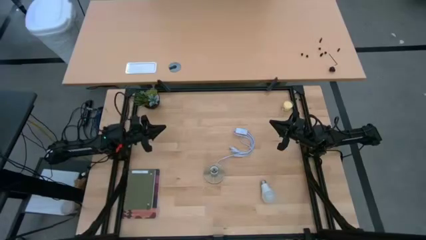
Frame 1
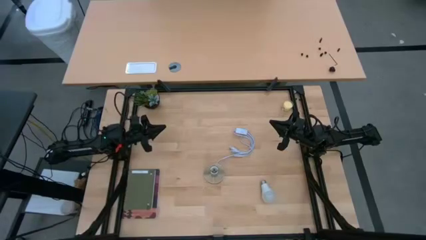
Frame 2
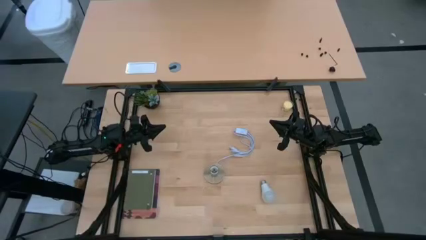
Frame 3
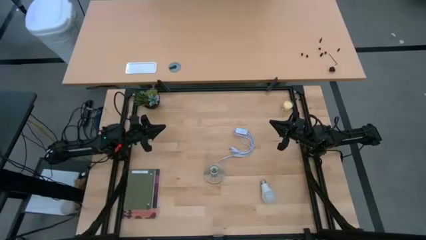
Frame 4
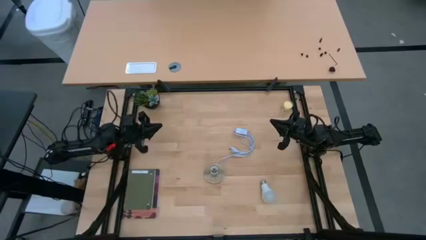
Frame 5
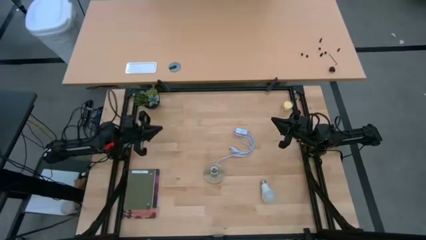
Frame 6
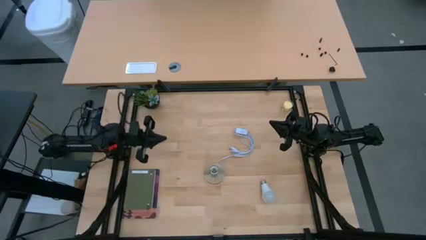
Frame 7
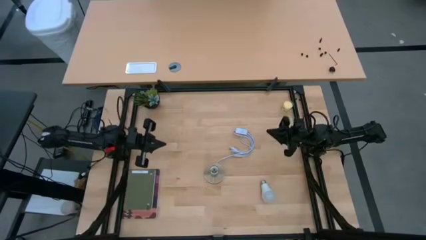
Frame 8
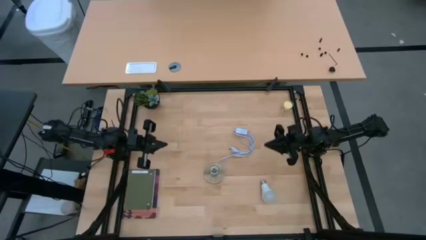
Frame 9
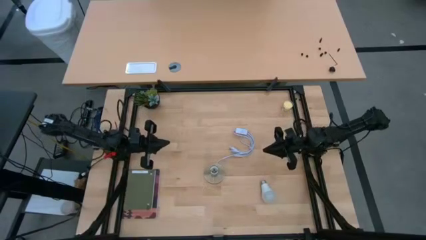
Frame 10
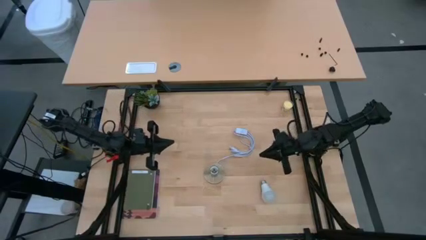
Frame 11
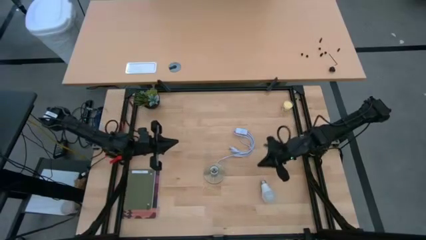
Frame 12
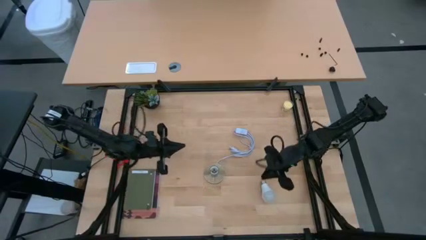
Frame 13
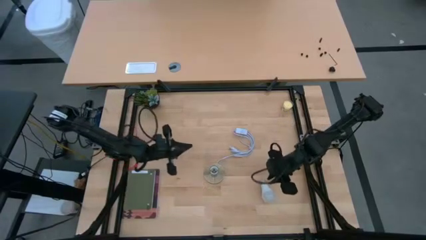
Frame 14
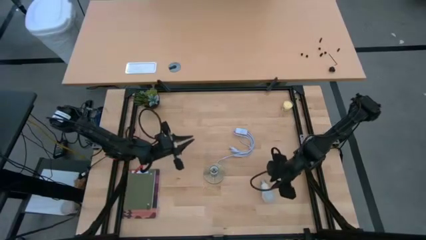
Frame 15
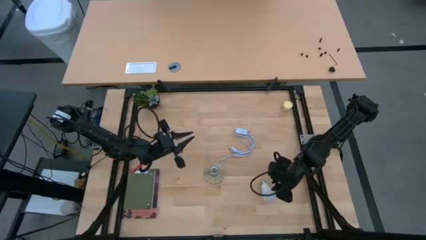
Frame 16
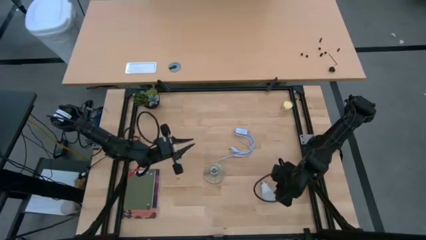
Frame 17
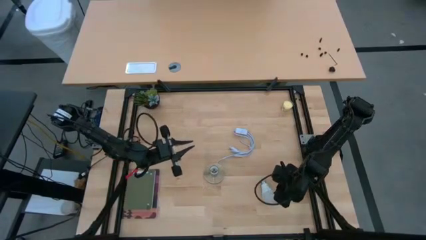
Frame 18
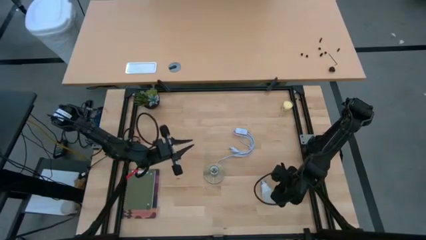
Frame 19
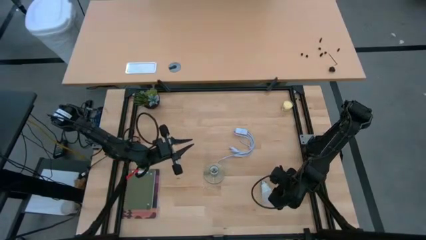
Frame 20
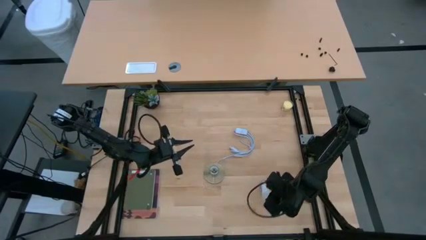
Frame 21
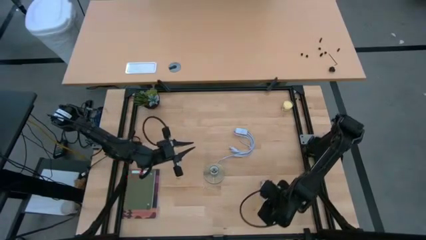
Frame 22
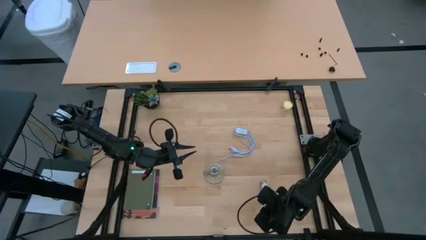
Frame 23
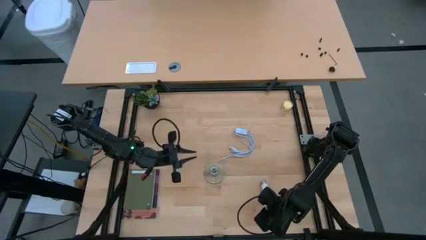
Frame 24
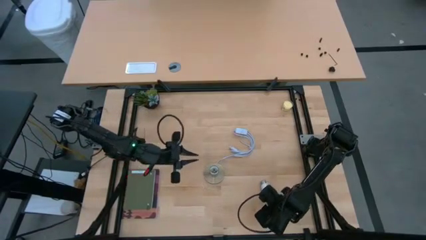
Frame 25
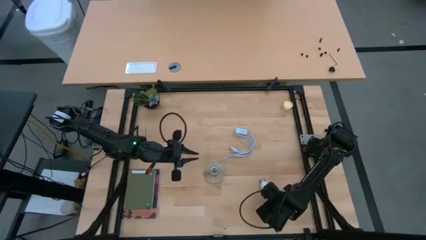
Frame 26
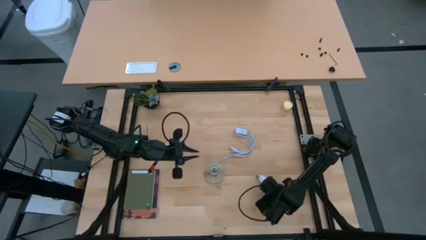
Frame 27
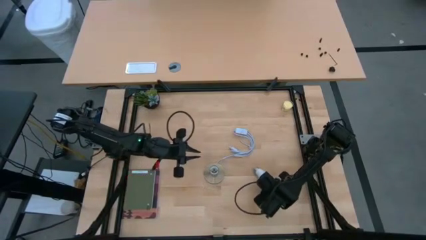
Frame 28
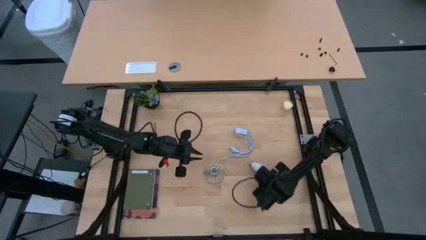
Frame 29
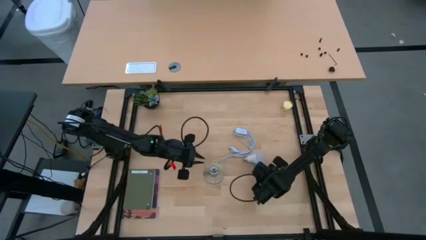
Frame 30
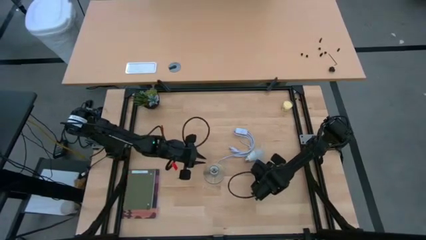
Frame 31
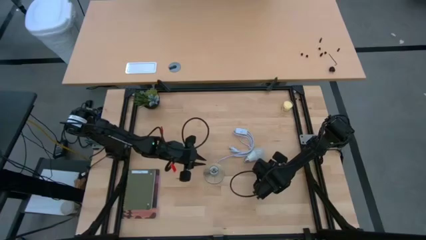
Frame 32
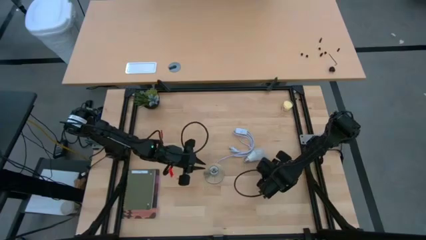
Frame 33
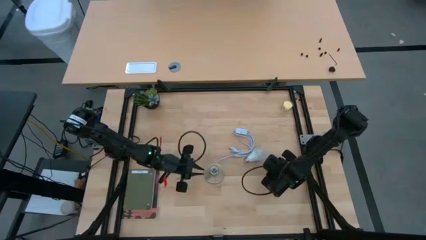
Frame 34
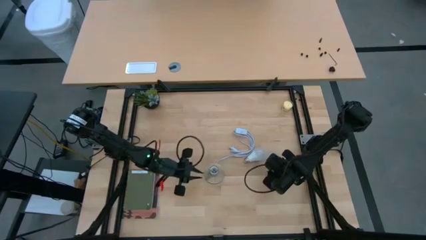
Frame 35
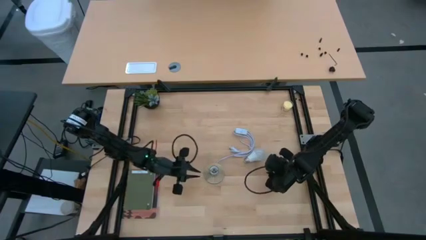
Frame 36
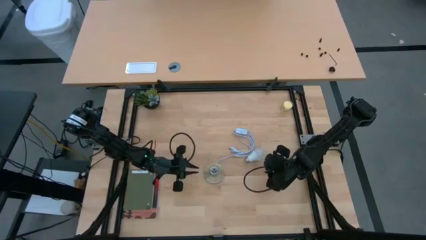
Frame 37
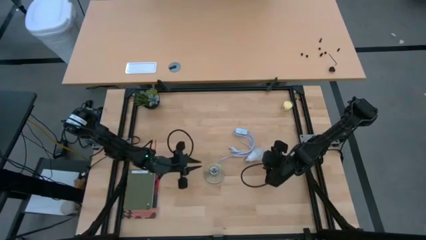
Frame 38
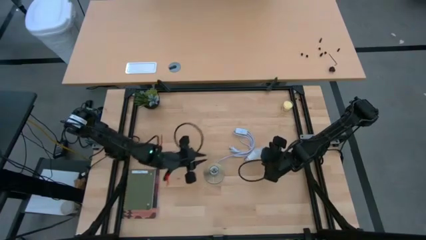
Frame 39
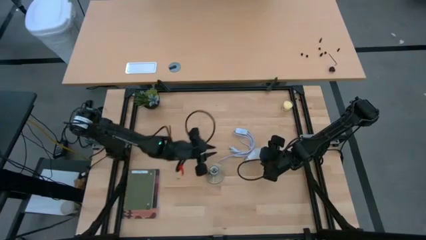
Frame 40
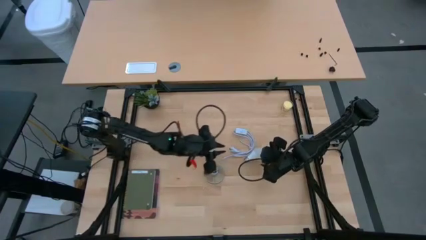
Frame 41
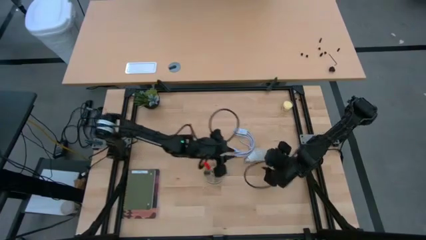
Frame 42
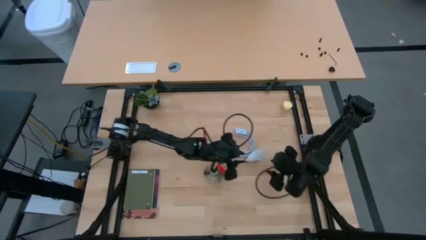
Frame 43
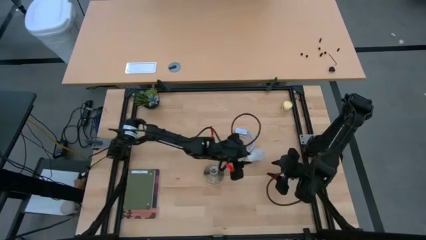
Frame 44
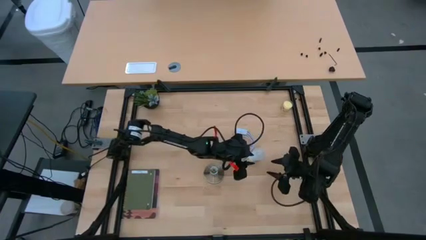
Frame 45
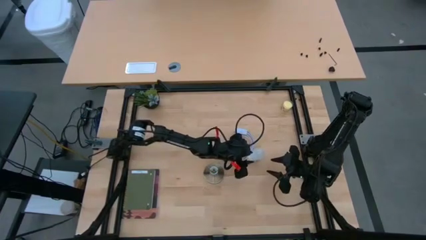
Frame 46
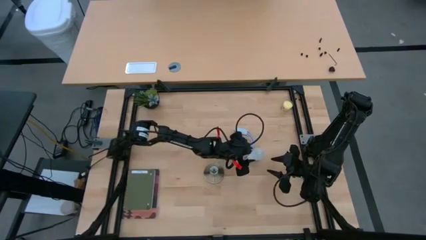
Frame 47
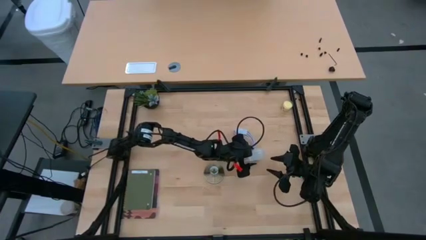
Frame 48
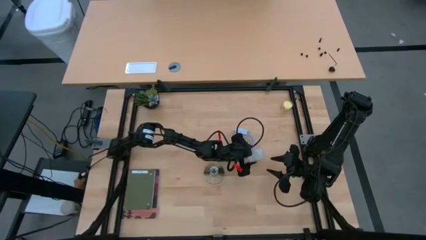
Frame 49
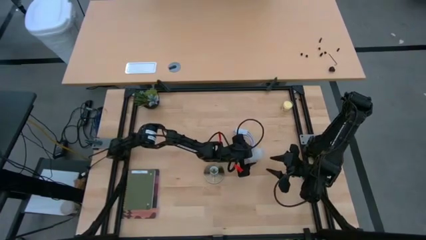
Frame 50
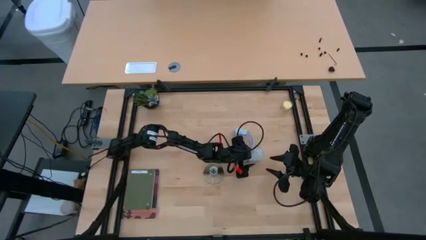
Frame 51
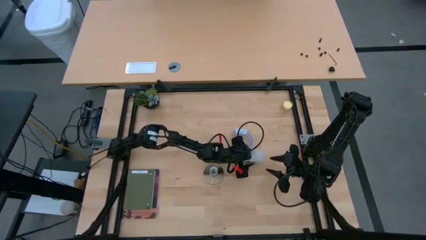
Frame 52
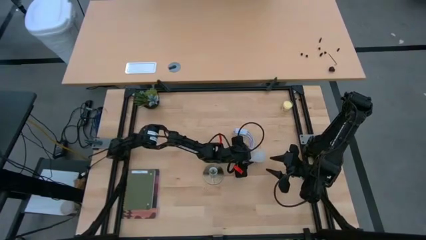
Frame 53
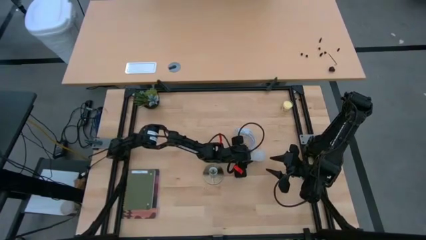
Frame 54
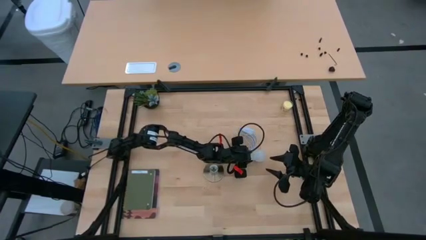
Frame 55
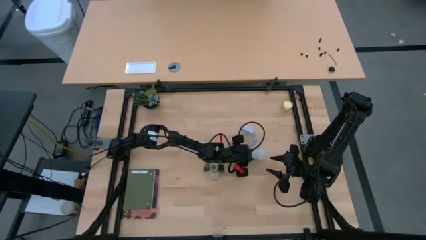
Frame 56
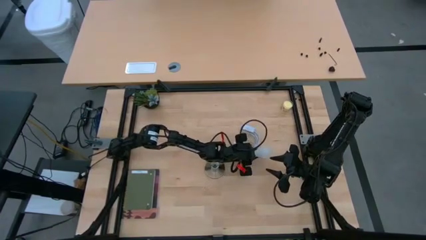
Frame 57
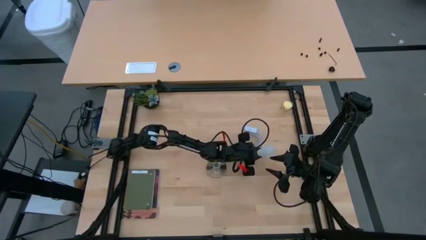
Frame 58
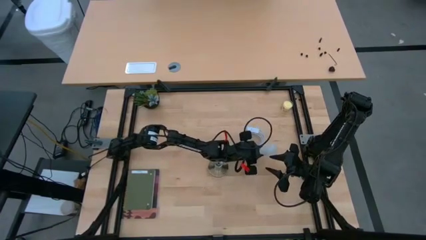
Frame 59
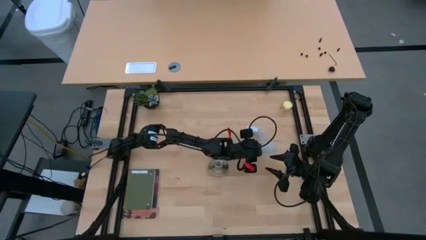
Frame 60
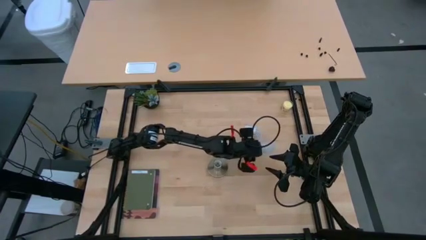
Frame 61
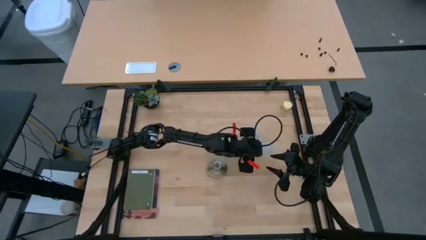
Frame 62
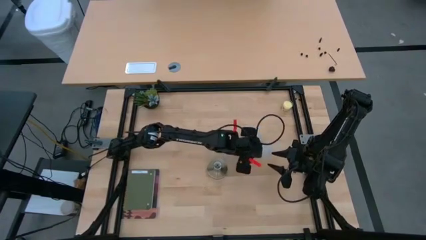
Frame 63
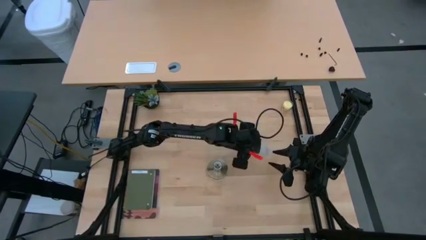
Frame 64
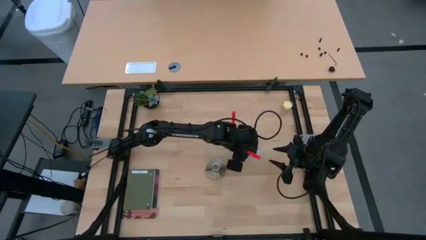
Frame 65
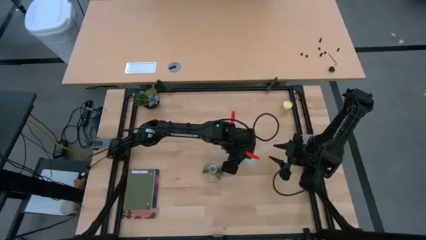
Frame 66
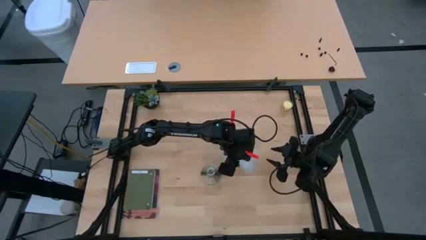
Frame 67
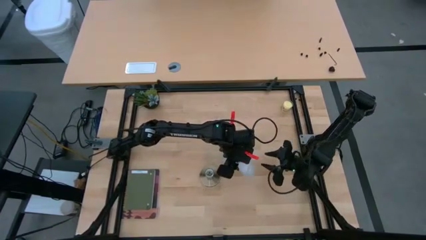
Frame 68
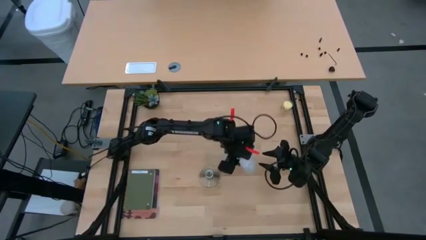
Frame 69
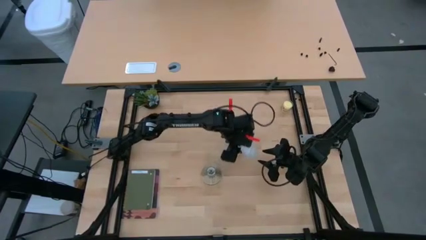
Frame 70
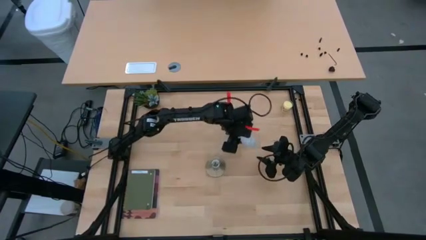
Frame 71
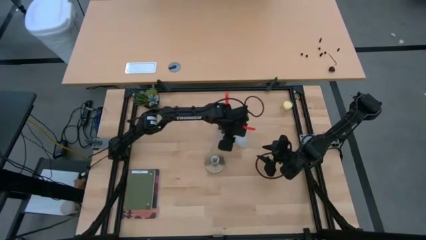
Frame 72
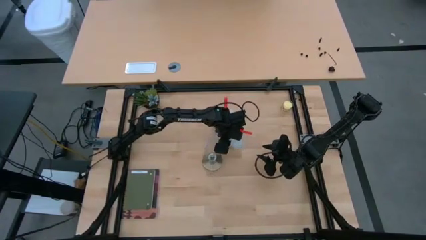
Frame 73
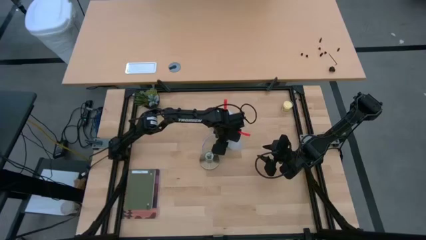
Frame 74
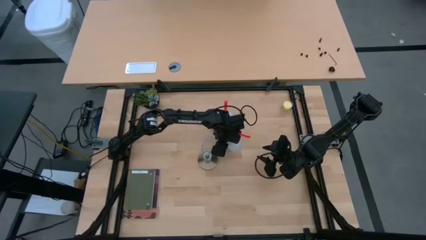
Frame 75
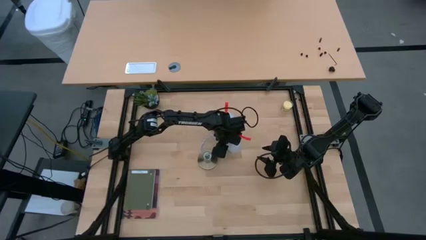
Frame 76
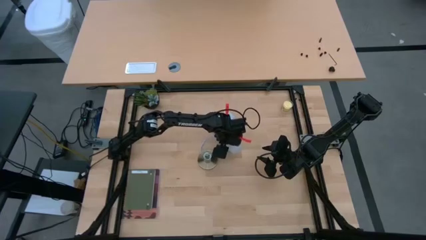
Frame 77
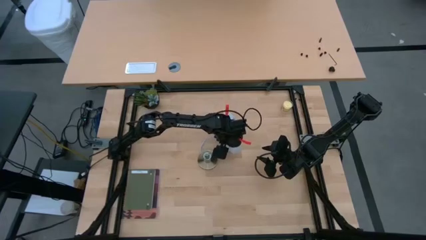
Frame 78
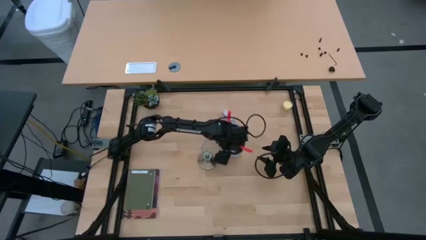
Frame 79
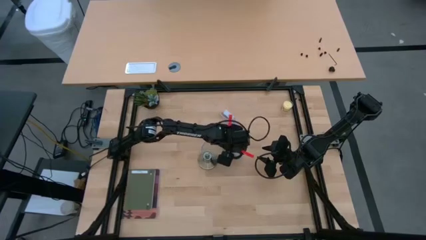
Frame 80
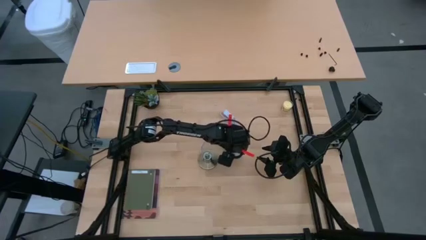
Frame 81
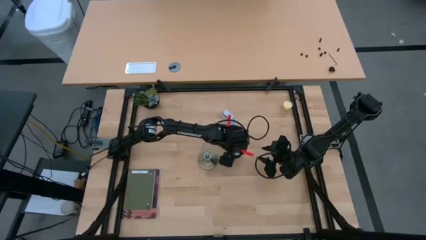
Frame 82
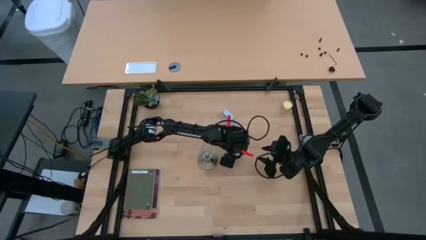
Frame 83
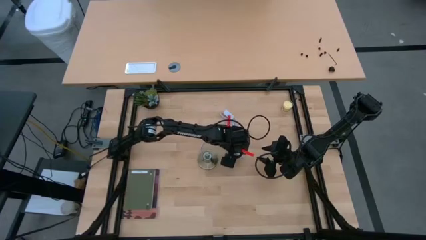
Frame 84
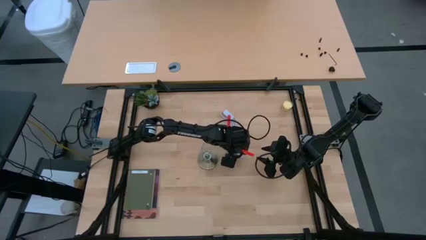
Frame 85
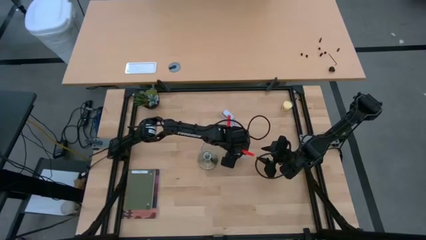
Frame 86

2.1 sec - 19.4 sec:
Task: Screw lightbulb
Insert the lightbulb into the lamp
